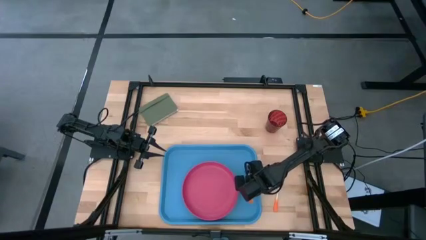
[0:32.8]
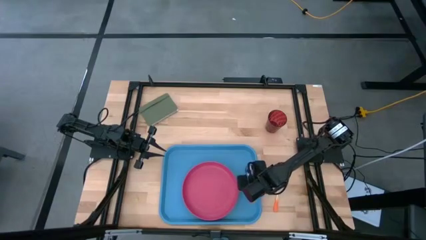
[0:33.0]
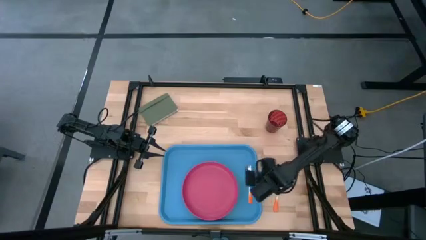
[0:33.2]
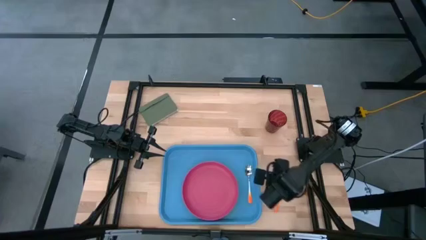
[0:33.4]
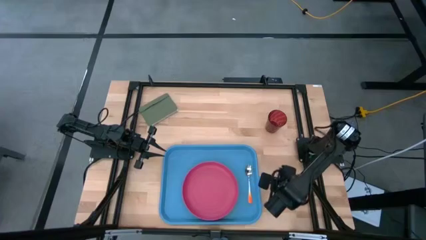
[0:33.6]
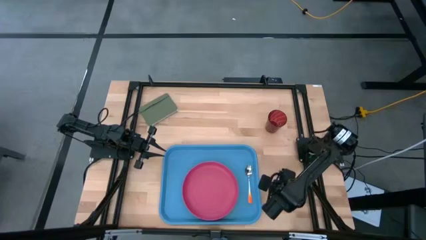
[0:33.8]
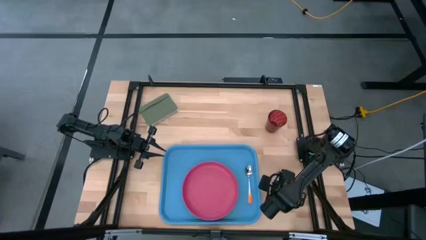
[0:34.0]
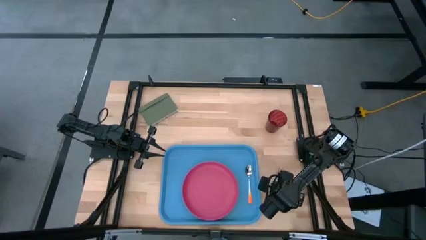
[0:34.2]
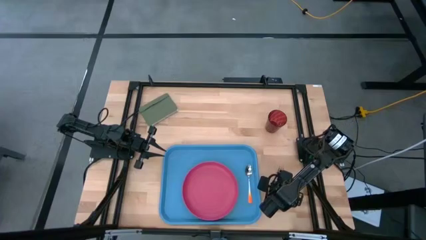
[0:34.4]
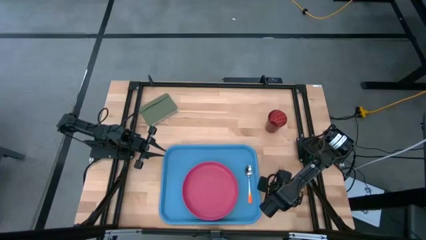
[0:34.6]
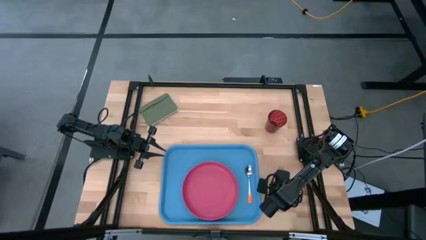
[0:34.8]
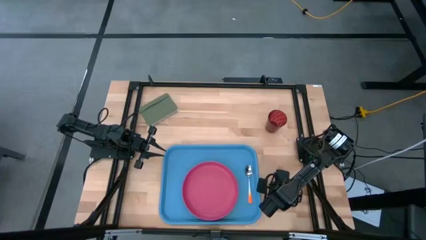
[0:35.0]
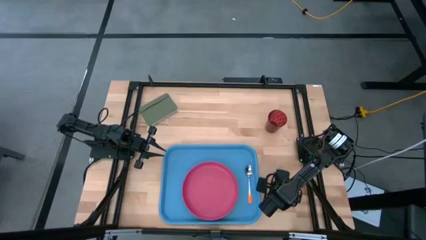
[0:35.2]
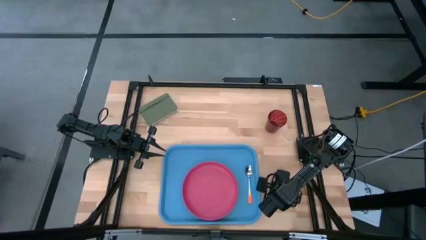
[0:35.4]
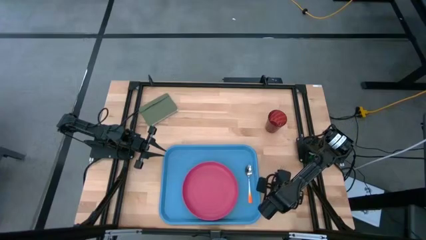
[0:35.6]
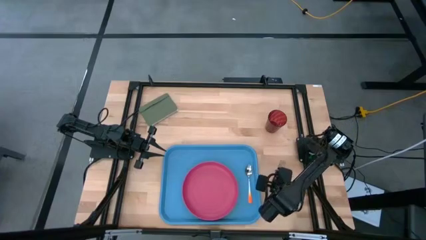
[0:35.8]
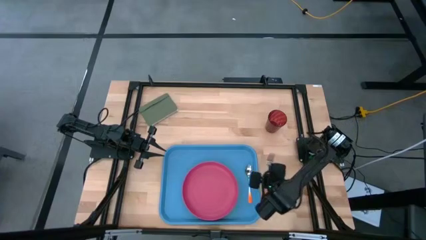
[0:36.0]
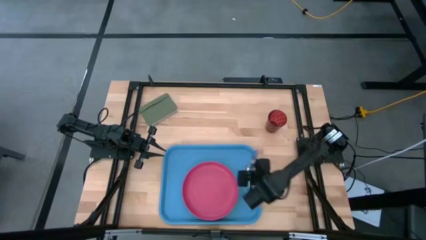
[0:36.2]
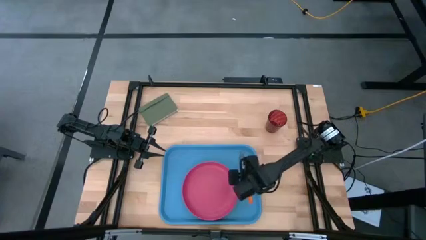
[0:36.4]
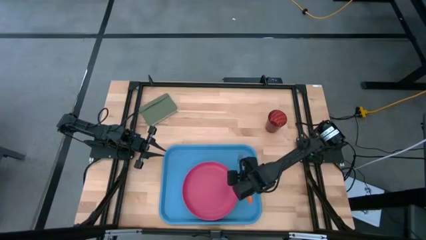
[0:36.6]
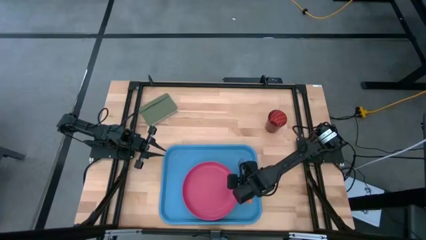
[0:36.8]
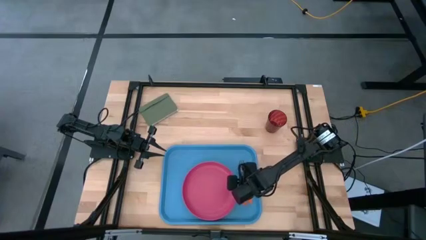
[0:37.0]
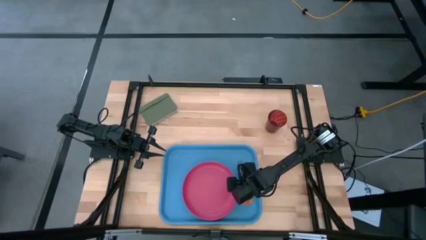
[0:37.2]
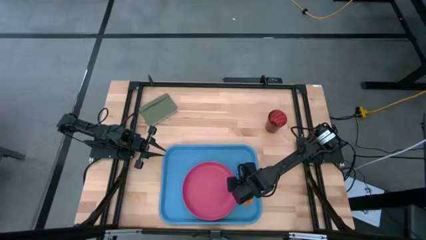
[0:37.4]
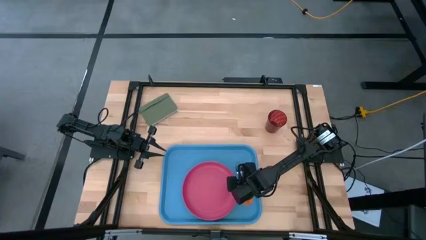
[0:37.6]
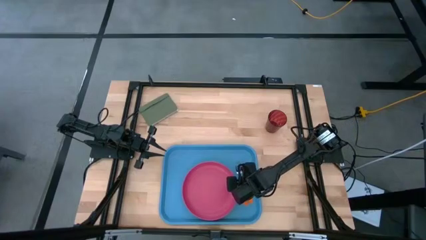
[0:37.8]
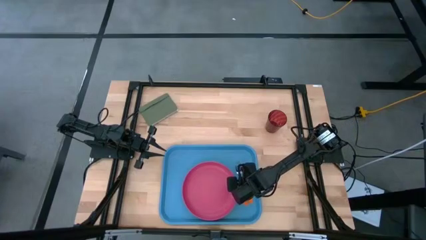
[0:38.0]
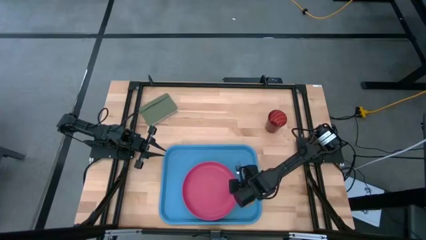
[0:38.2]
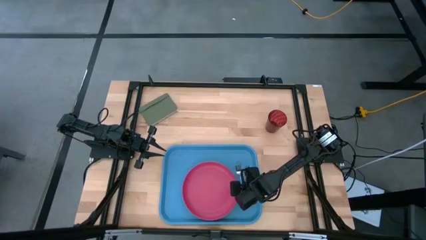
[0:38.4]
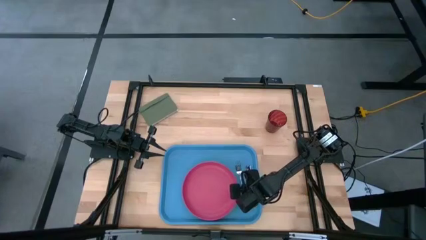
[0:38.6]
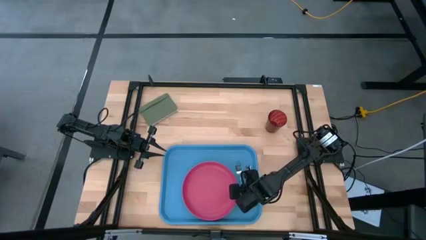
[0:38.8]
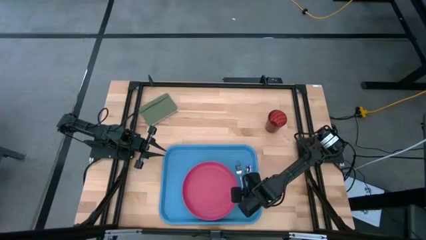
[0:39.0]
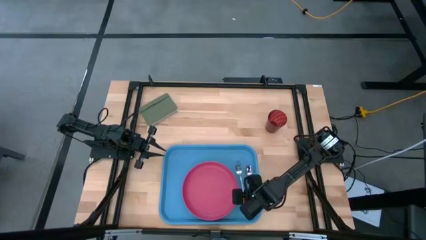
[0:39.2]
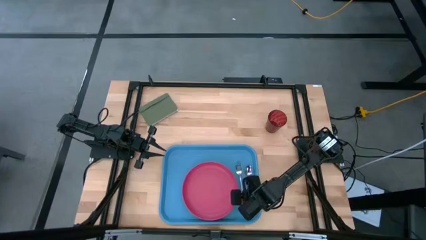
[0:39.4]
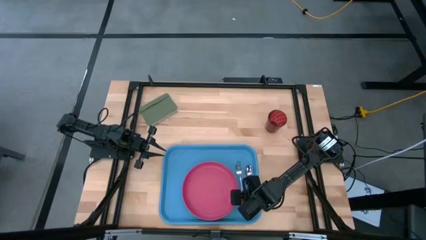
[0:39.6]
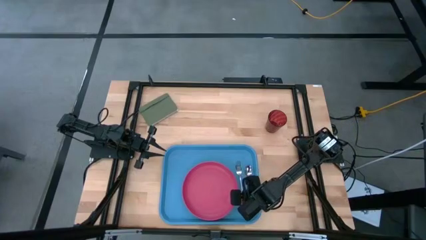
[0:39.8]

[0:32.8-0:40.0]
Task: Pick and place plate/cup/fork/spoon on tray
Put the orange fork on the blue serving tray to the right of the red plate

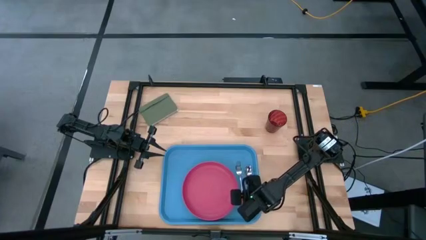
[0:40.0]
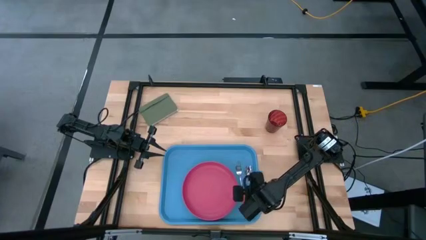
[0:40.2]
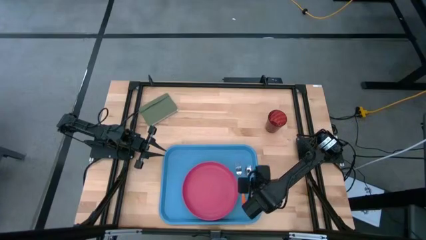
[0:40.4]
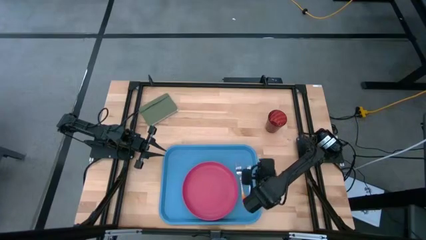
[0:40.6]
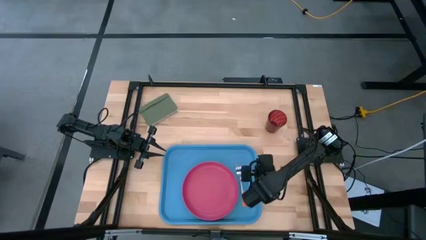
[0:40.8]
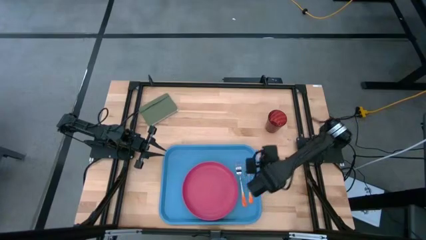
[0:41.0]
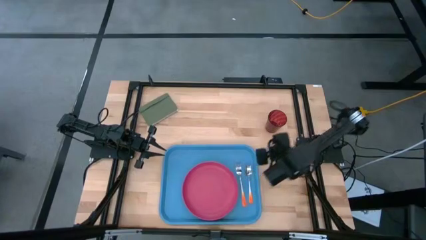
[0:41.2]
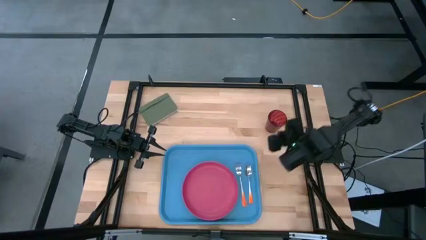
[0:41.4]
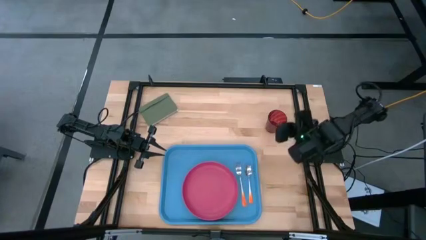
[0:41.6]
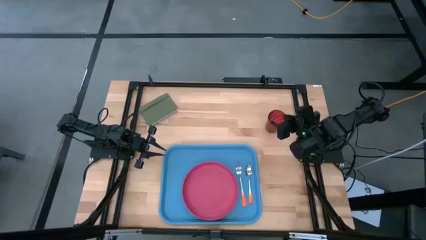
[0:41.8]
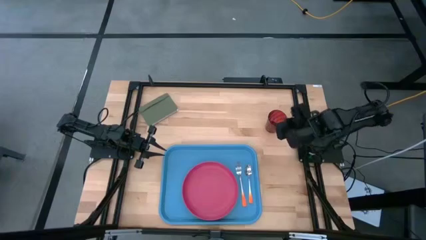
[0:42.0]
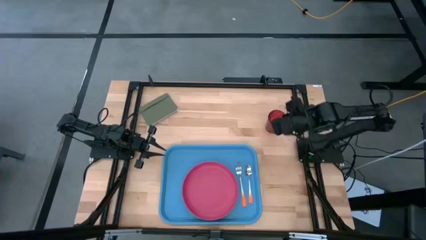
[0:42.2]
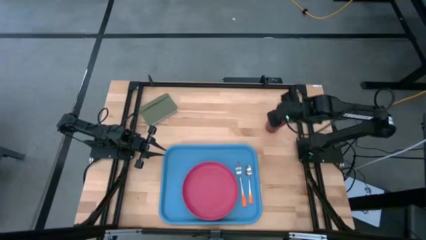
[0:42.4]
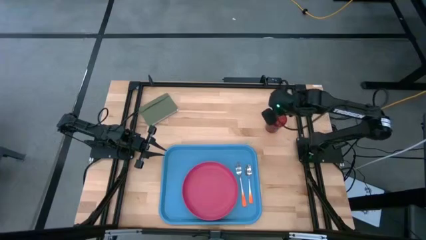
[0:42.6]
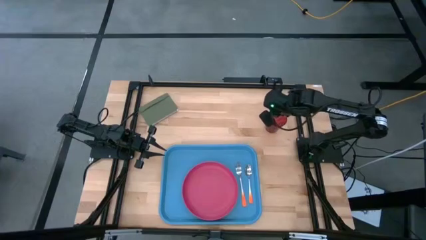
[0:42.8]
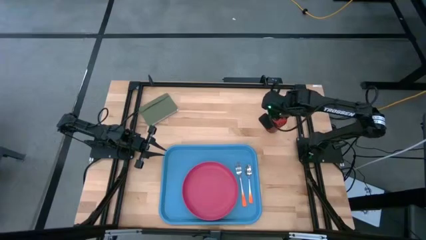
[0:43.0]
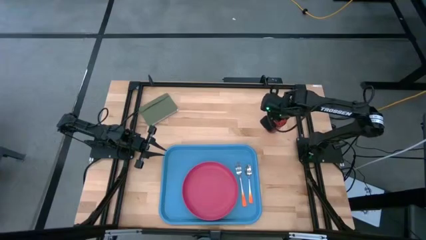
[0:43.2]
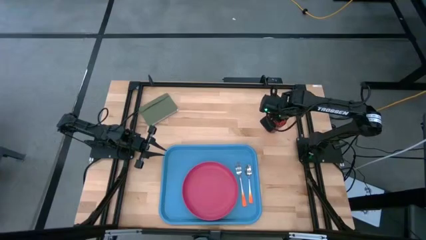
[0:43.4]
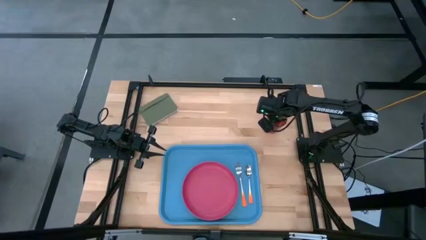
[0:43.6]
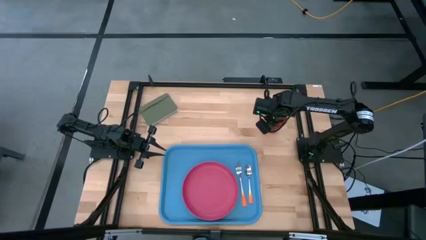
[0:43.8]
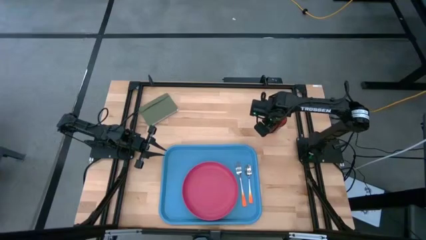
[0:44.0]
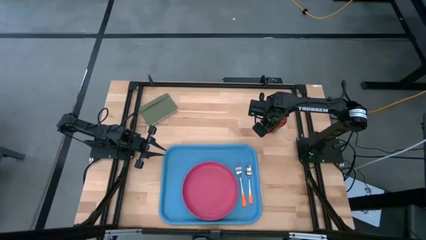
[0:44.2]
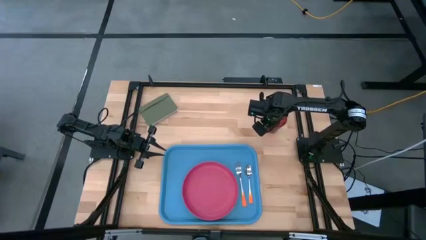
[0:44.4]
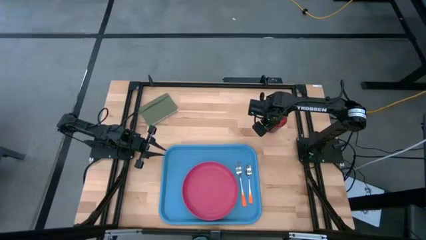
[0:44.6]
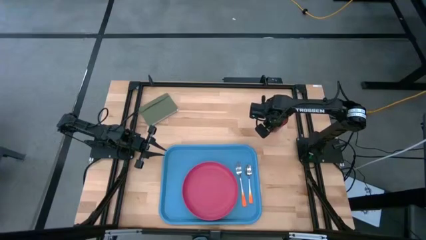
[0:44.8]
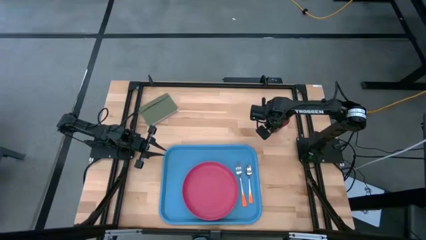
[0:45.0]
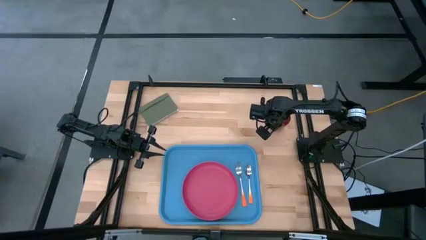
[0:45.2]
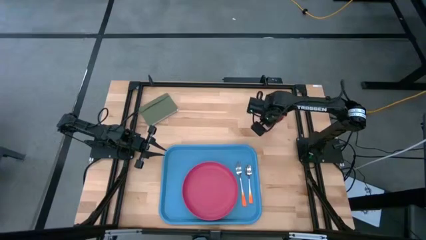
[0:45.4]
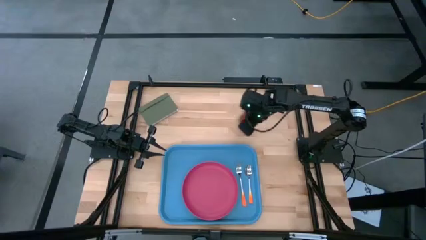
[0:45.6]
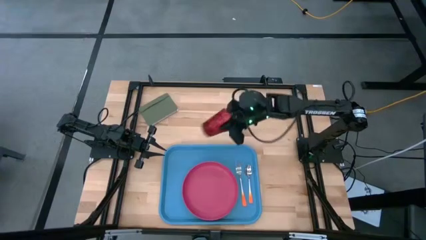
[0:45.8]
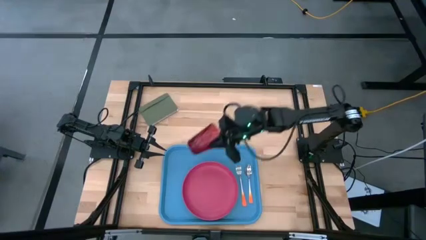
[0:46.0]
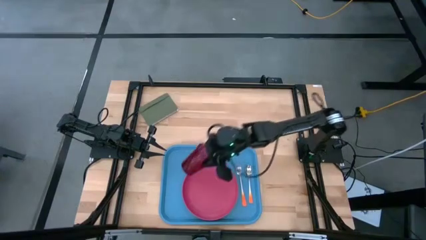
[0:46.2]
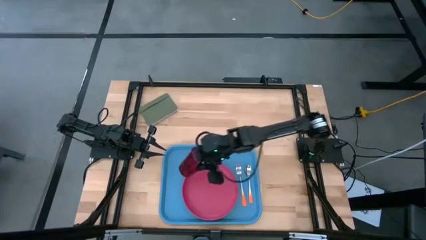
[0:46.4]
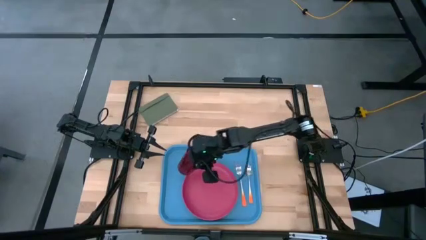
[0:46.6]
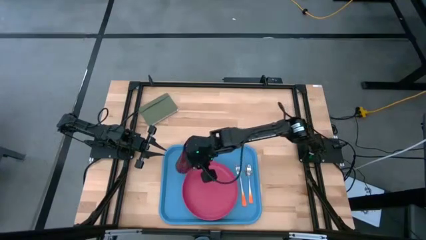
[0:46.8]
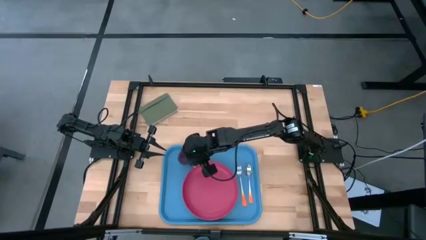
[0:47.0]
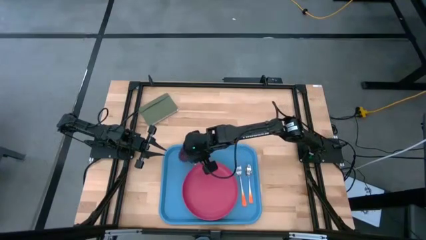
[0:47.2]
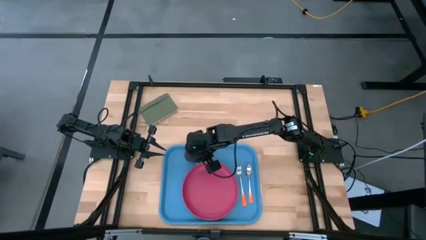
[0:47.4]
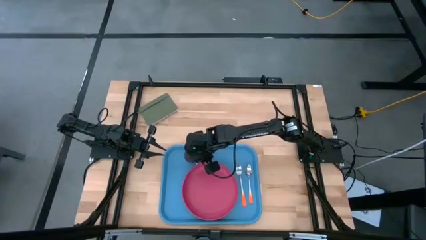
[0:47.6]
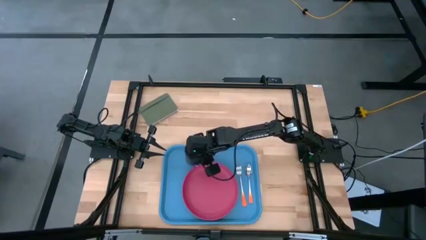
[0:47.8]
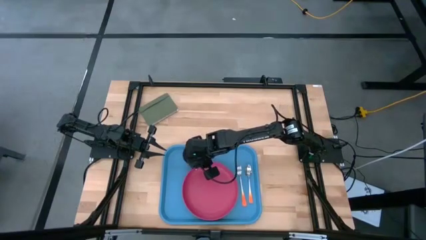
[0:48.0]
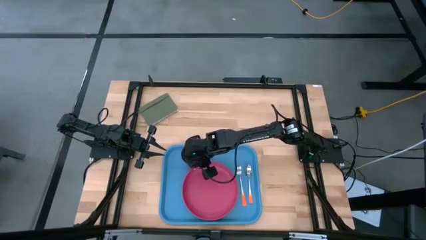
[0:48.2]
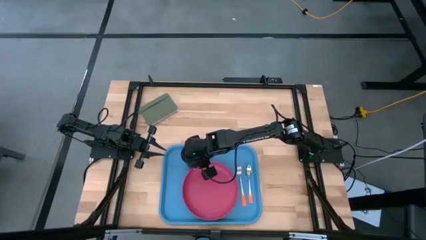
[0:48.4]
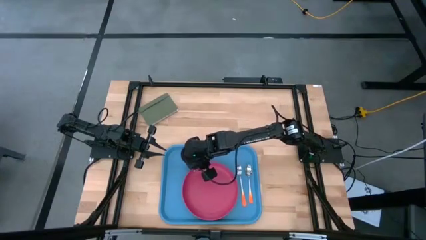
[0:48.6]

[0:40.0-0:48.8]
Put the red glass on the blue serving tray to the top left of the red plate
